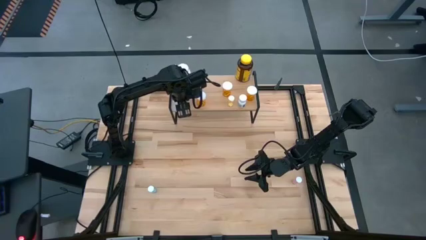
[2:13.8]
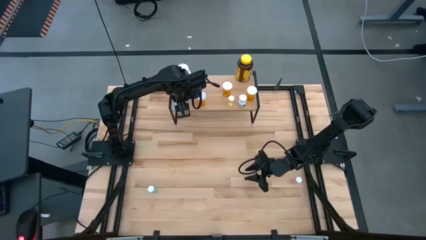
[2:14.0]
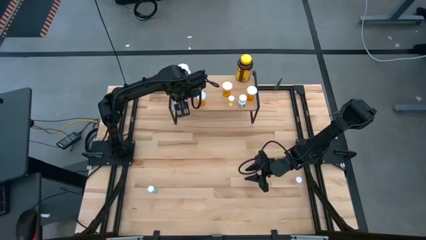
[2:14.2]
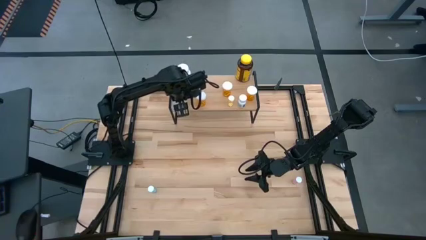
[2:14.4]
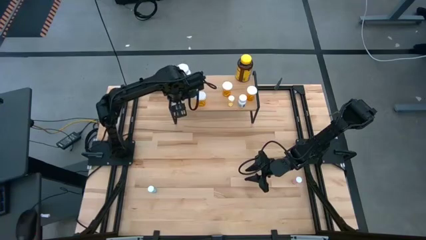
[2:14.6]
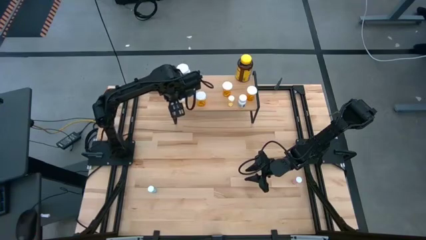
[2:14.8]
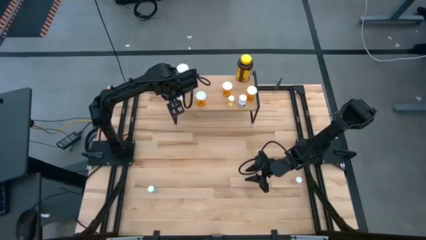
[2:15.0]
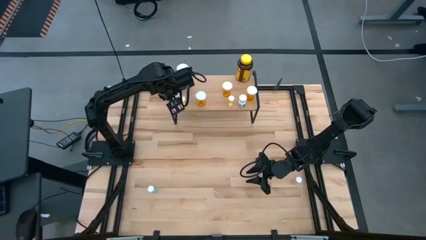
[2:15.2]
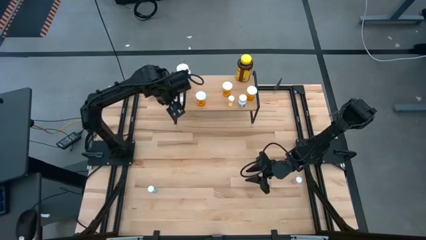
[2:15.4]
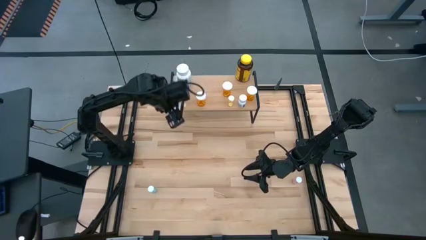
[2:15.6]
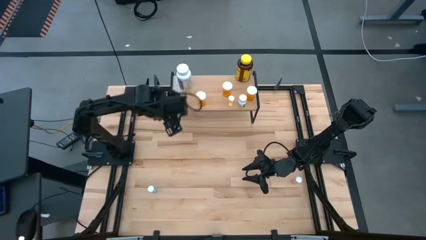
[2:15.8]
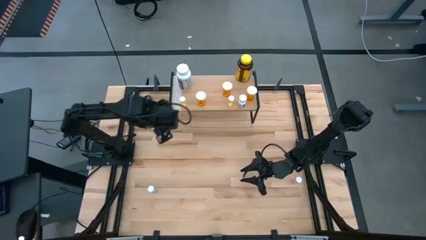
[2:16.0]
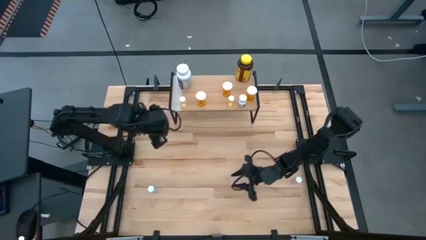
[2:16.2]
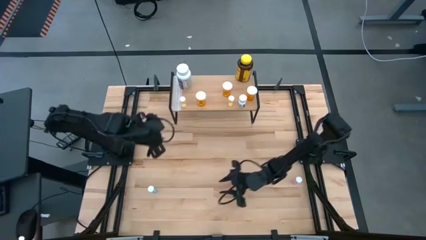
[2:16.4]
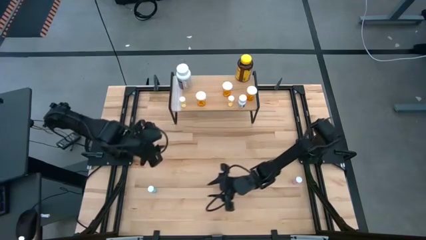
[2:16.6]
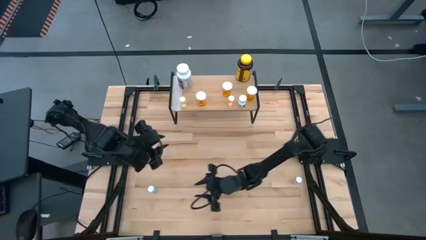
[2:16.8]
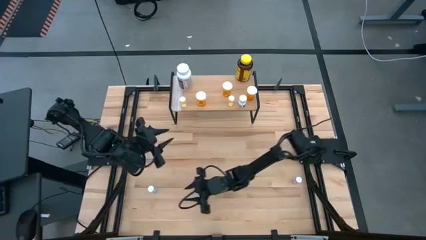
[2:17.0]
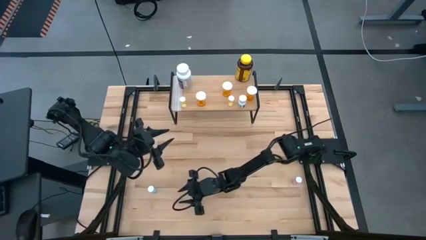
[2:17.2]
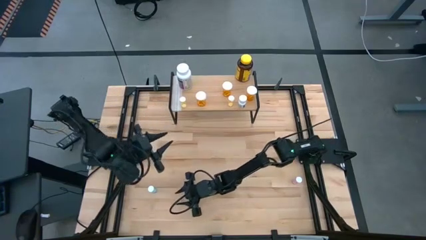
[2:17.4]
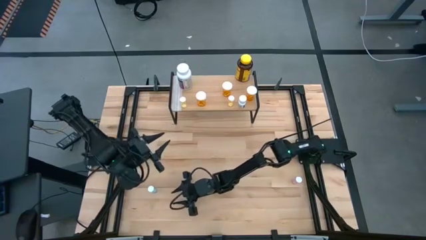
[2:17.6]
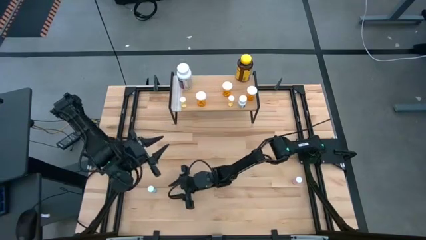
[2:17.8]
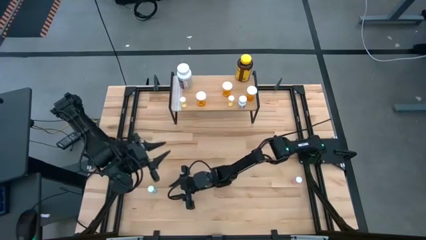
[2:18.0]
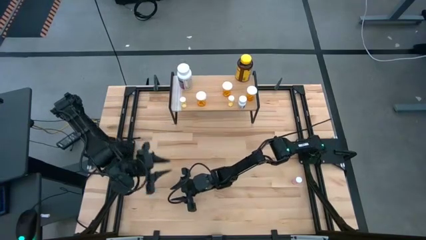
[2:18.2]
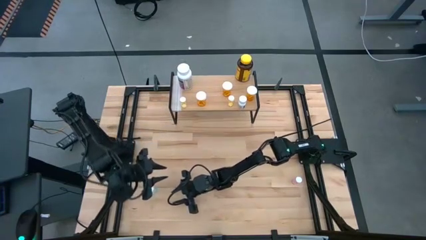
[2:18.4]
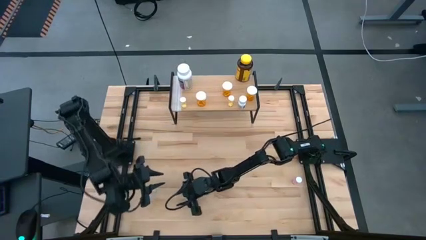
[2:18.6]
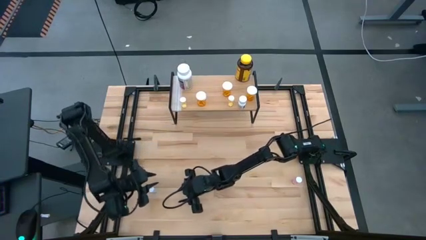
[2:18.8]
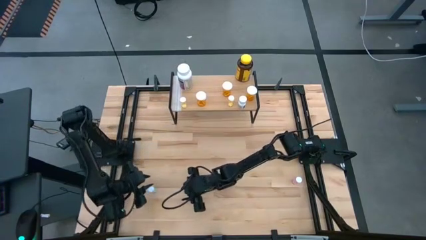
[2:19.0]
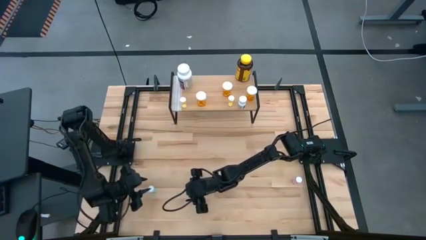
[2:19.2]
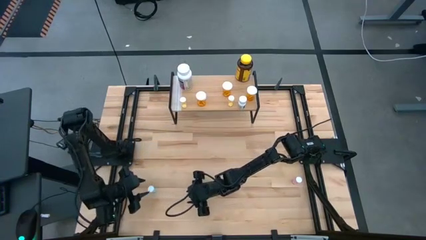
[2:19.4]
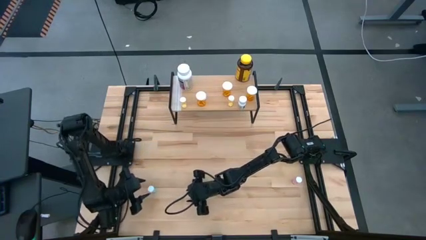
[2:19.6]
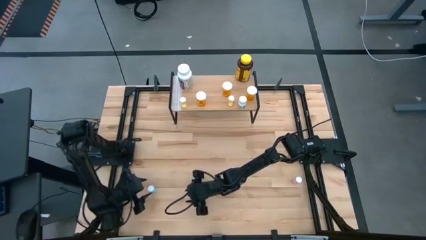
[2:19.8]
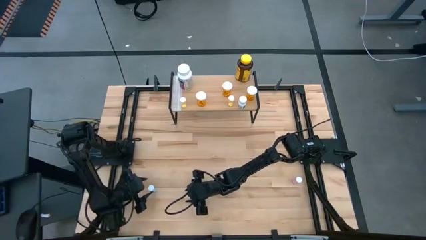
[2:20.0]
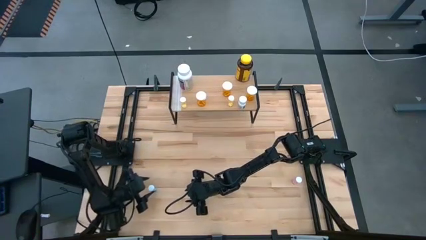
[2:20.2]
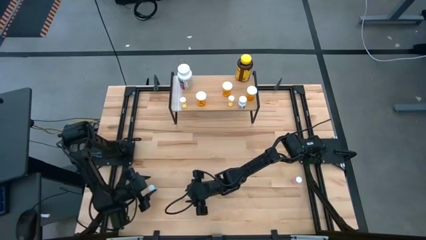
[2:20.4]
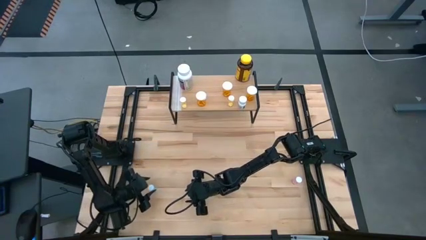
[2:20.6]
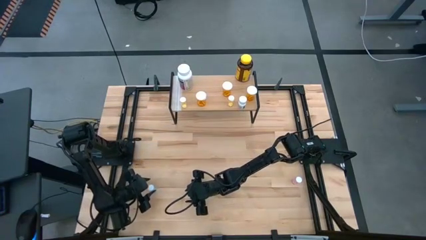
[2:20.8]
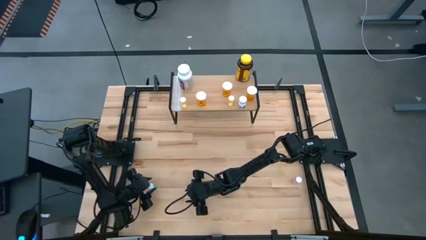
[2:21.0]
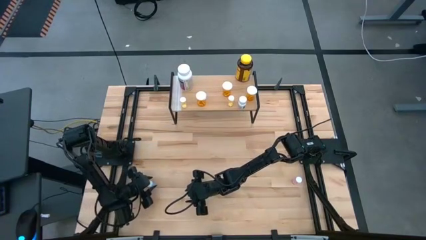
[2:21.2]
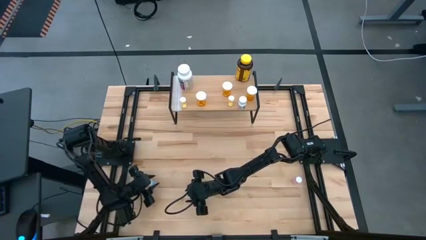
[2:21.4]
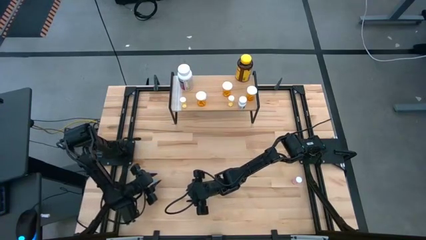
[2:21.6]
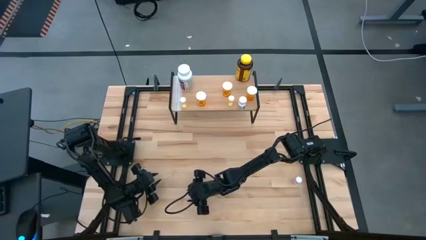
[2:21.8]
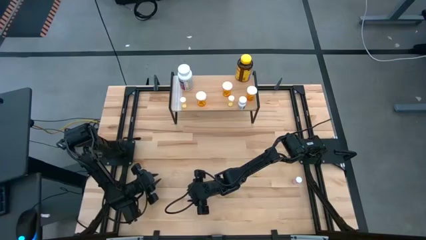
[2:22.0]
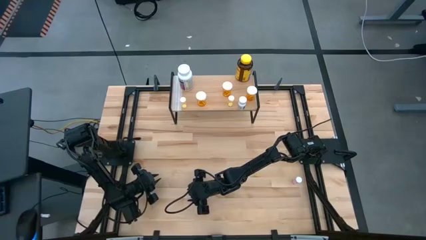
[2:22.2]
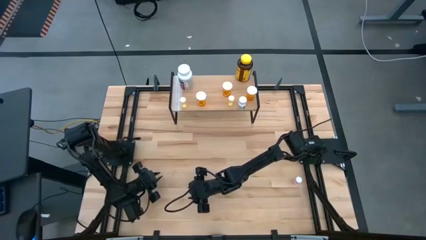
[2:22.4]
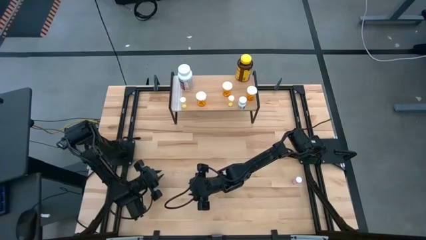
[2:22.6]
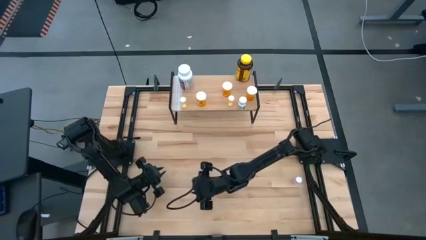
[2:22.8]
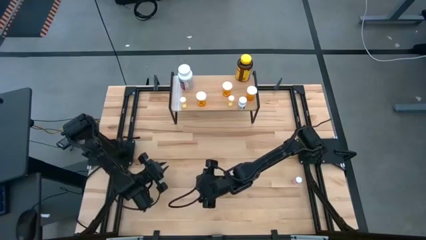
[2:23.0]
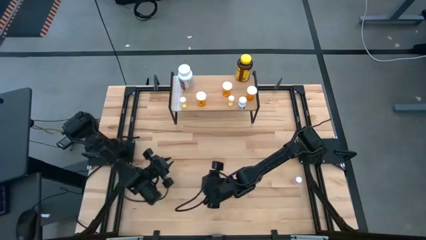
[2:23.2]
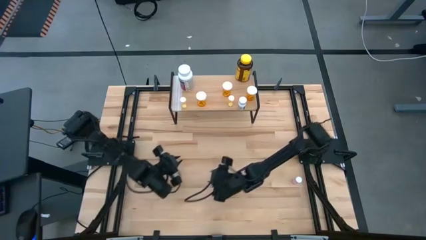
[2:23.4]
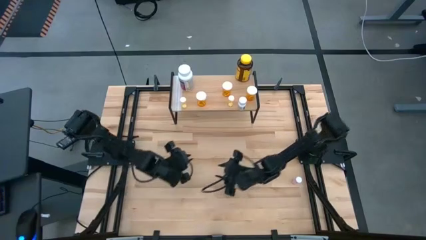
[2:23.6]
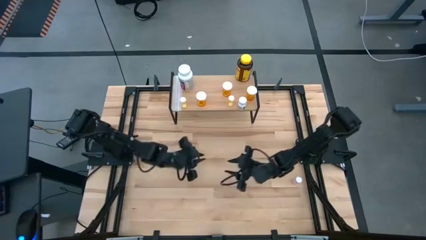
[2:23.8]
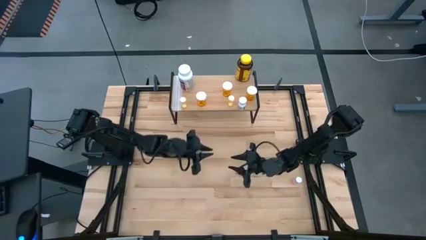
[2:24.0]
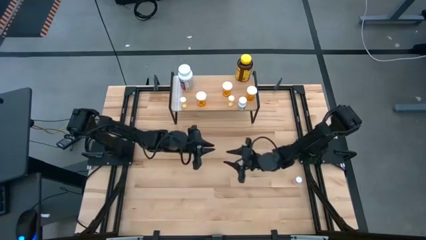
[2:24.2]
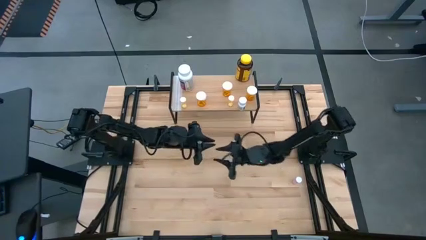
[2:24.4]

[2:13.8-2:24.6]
Task: Pick and place medicine bottles onto shelf by color
Put the small blue medicine bottle on the shelf

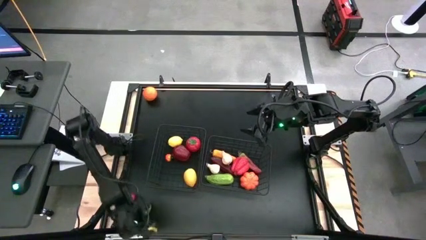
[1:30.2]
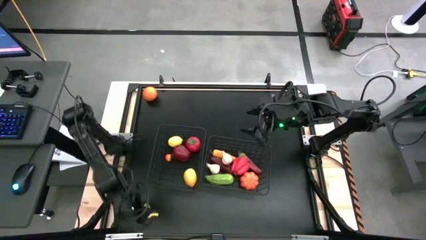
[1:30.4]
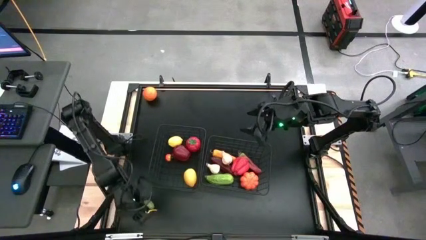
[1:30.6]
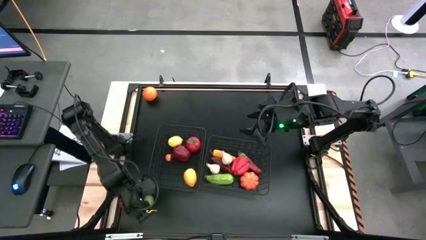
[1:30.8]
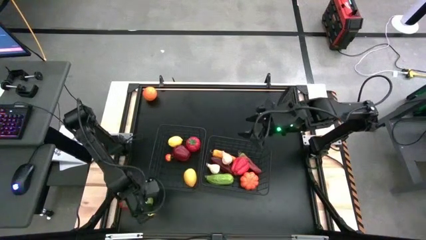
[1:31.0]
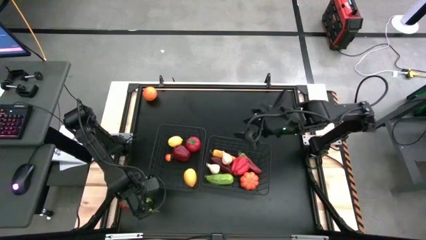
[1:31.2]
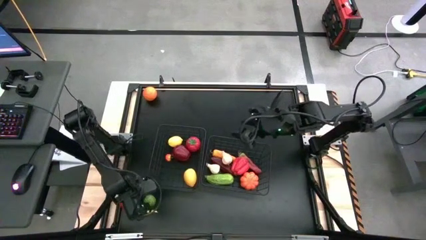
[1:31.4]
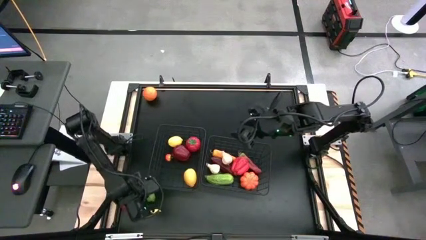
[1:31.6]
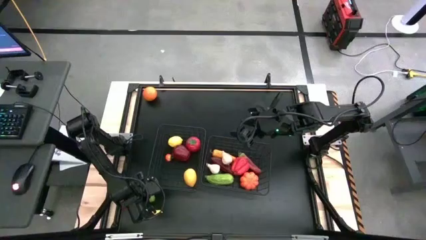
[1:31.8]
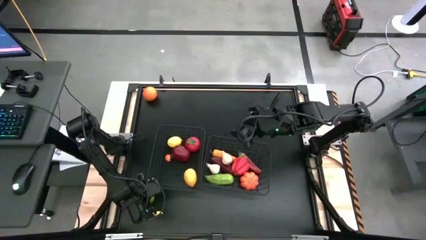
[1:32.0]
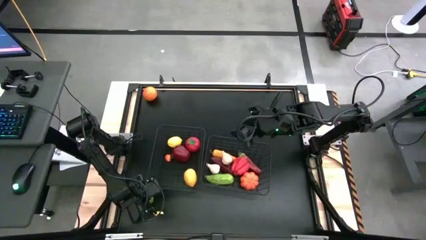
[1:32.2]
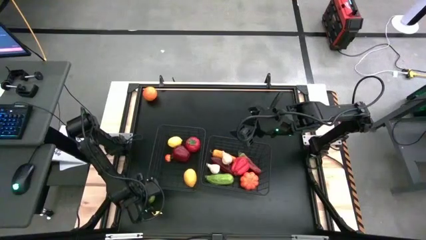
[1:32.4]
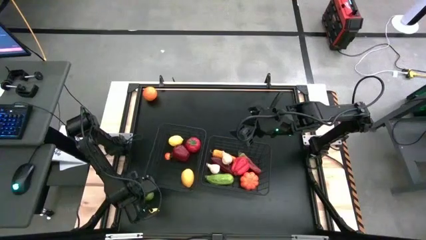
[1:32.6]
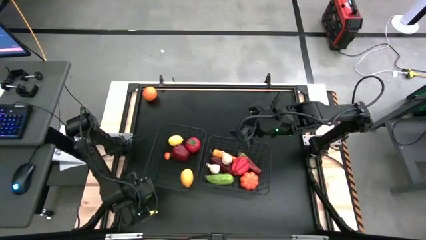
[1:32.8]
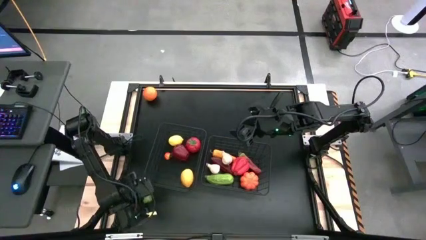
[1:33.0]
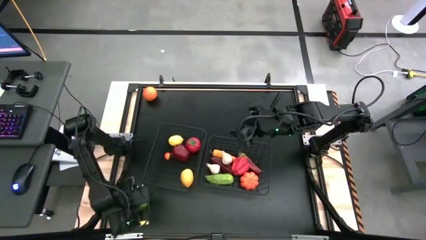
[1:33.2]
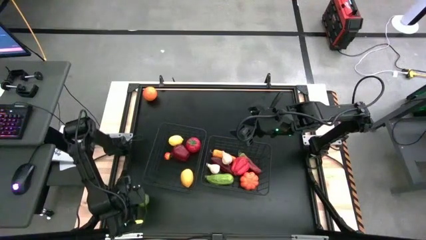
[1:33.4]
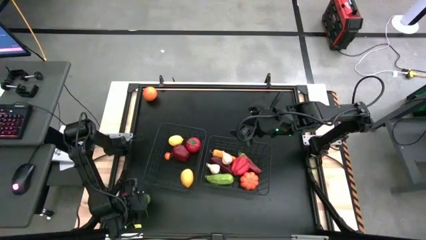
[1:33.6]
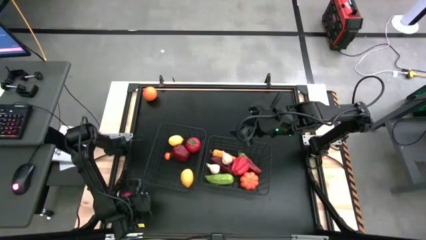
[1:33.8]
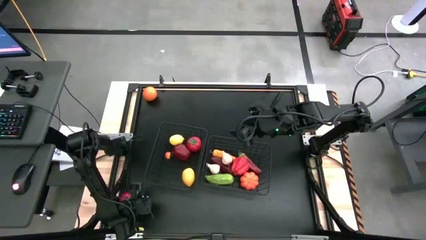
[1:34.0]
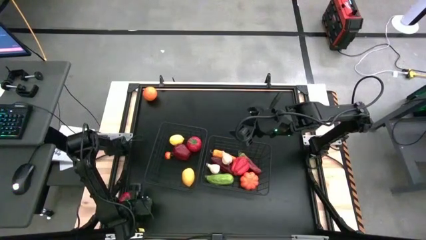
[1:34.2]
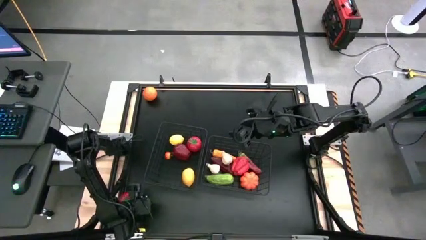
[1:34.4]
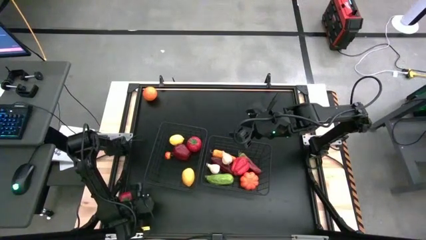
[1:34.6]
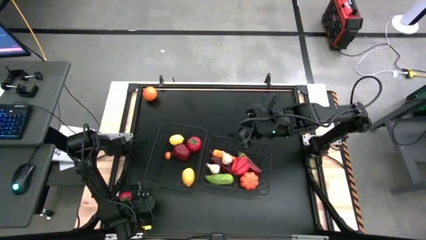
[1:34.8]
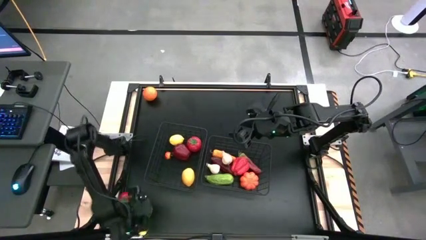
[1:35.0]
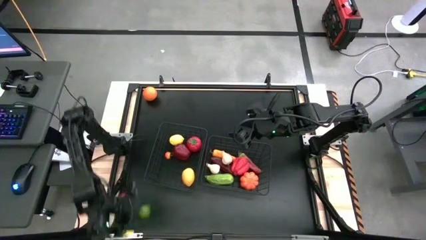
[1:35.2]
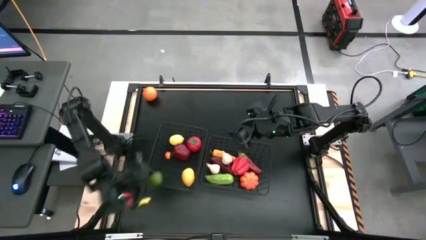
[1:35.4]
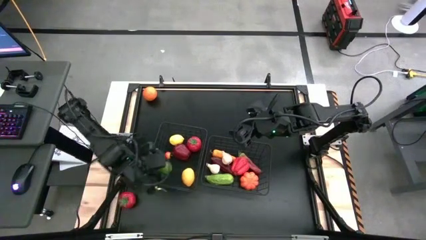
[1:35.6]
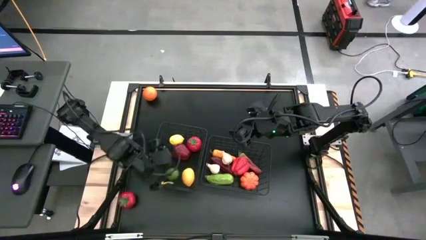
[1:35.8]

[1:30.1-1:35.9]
Task: Sort produce into baskets
Put the green lime into the left wire basket
